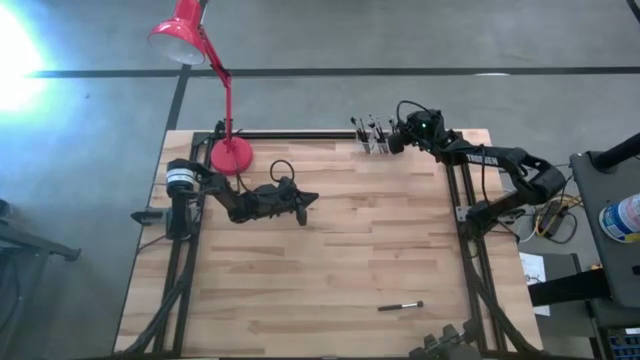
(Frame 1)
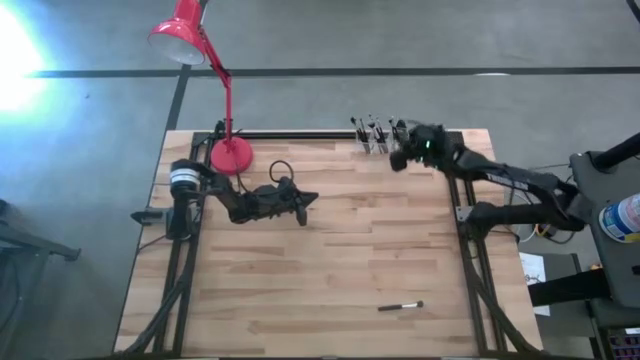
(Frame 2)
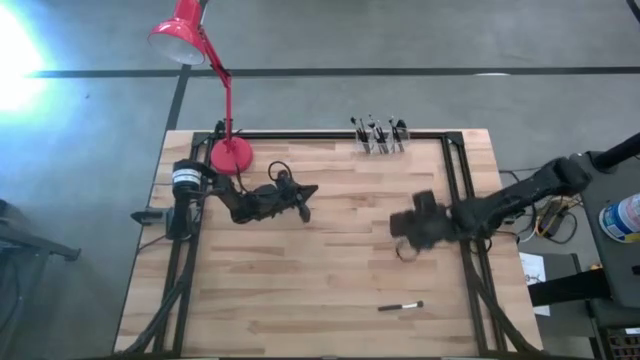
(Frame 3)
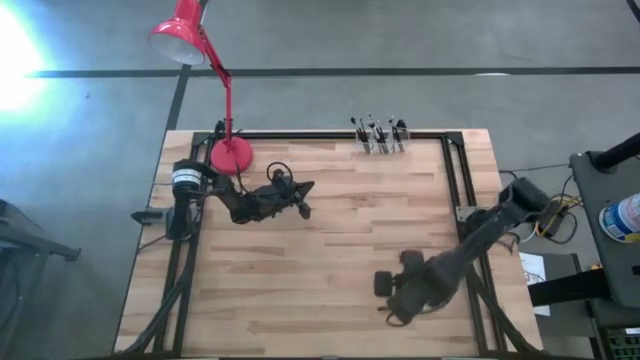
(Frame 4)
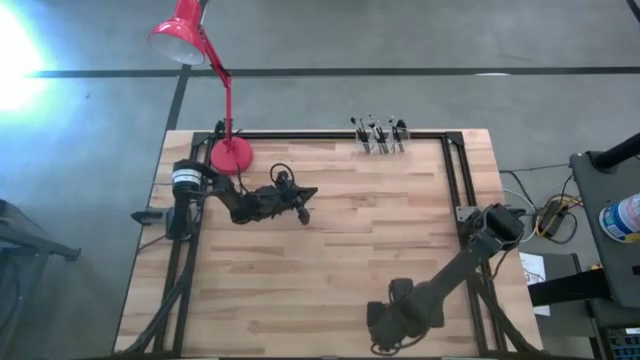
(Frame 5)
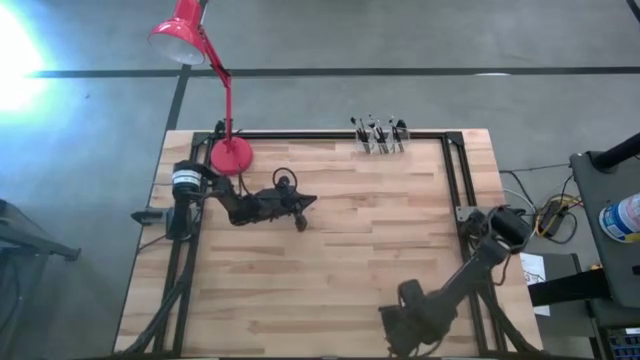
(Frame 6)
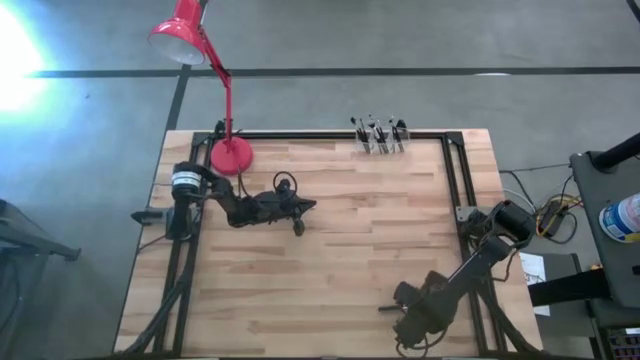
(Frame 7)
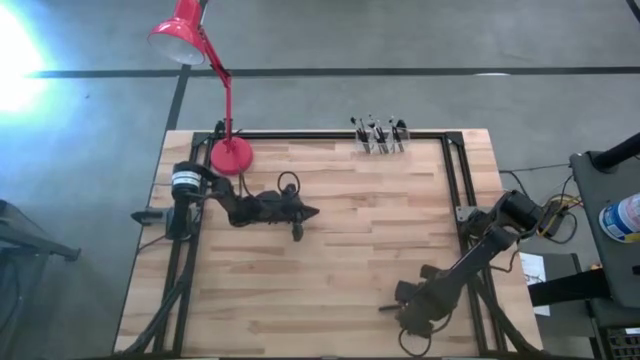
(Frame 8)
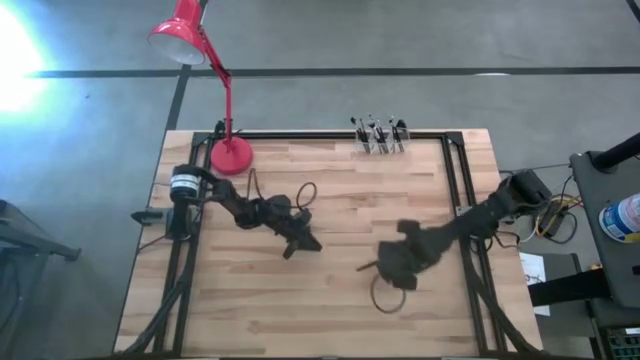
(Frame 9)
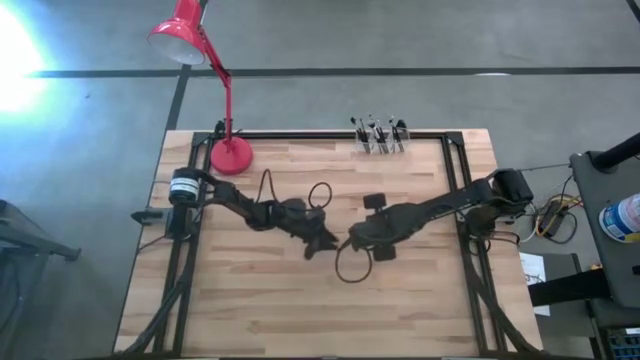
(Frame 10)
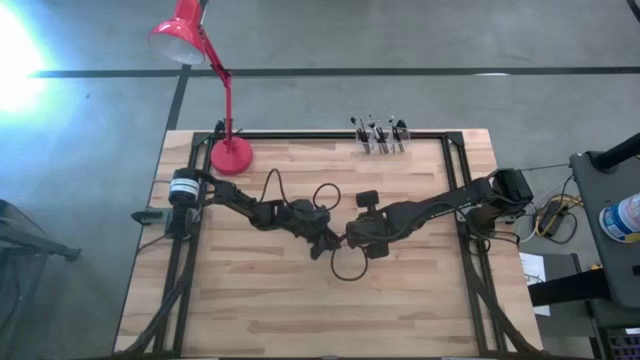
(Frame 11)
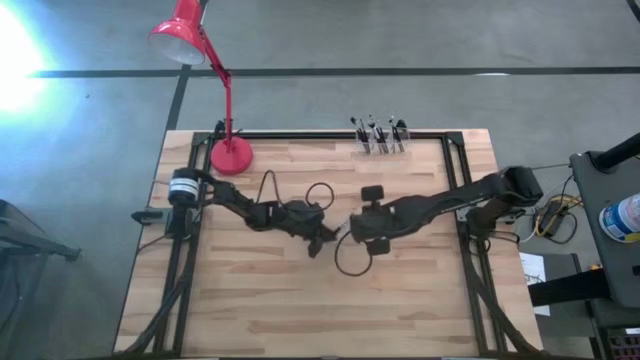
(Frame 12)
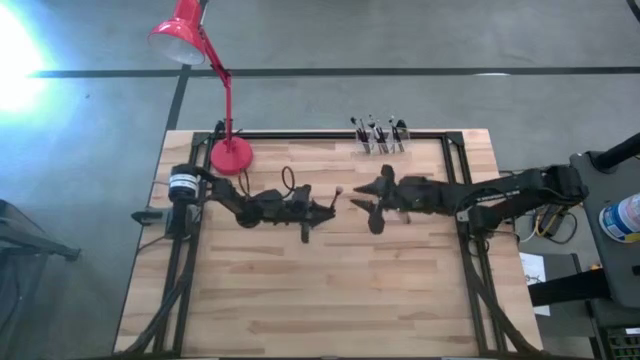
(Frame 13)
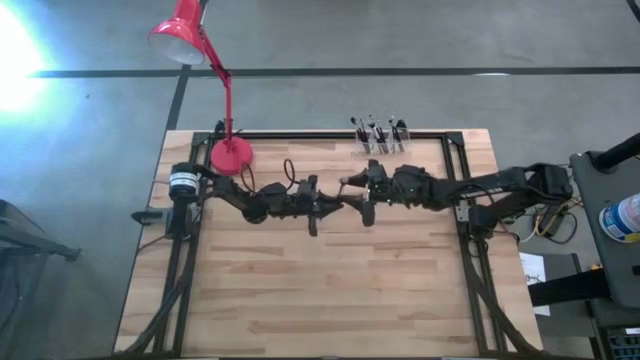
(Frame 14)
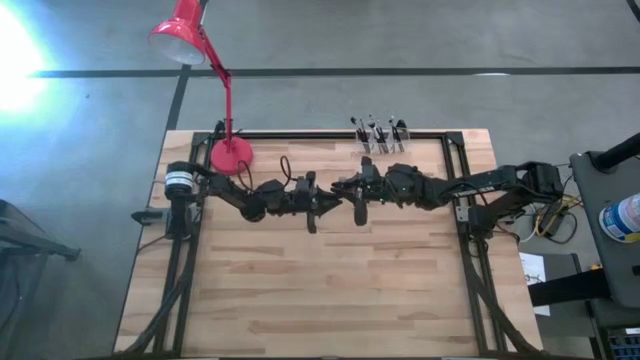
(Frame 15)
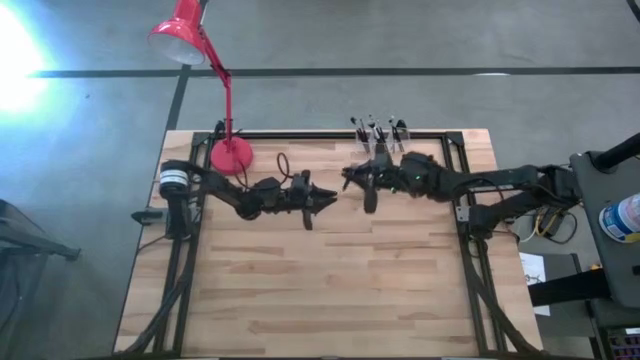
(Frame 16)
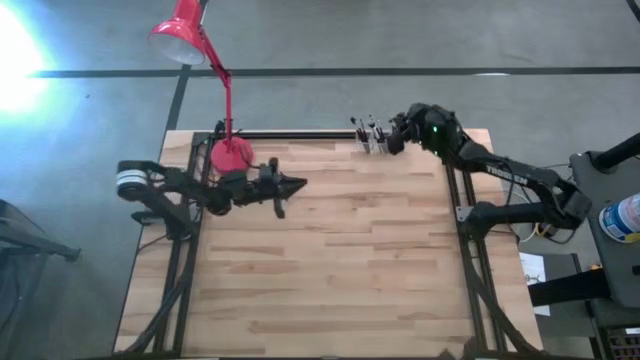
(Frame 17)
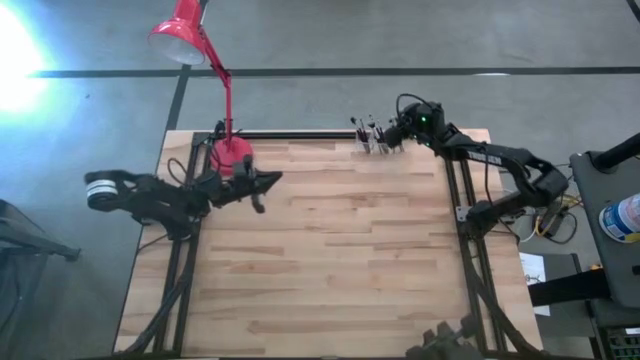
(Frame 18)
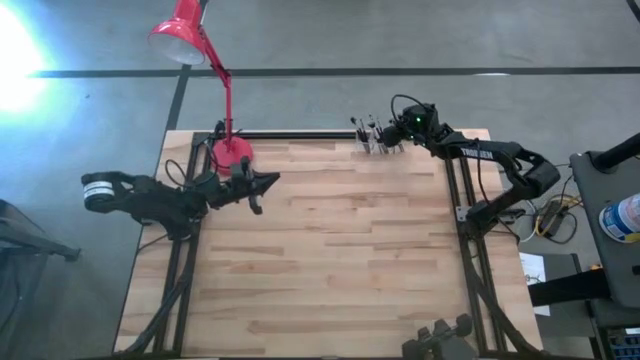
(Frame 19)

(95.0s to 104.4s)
Task: Put items in baskets/containers
Put the powder brush into the transparent organizer

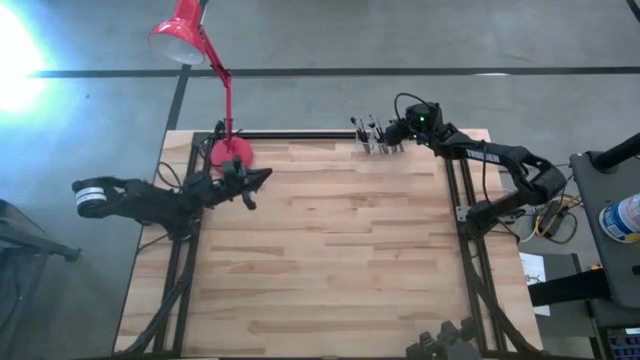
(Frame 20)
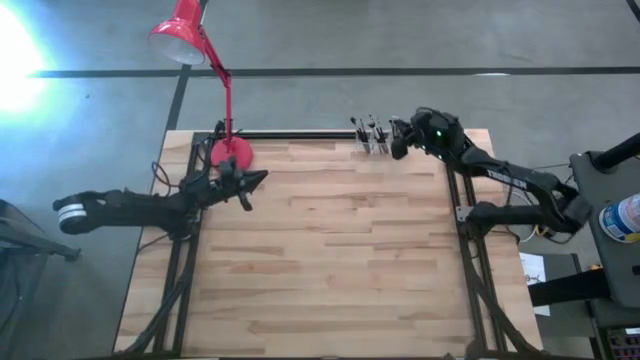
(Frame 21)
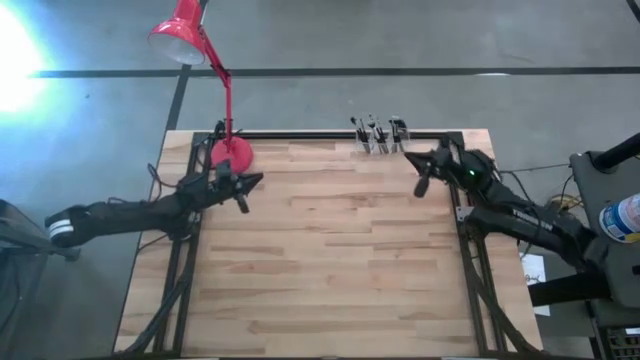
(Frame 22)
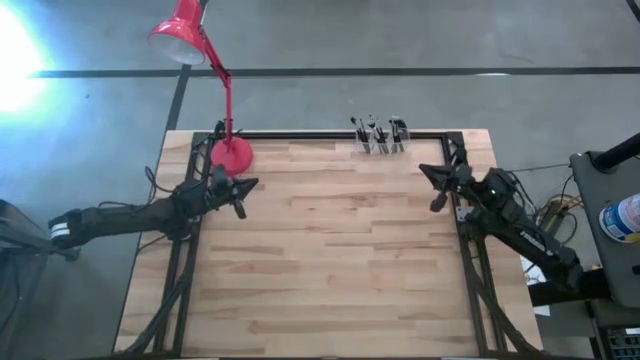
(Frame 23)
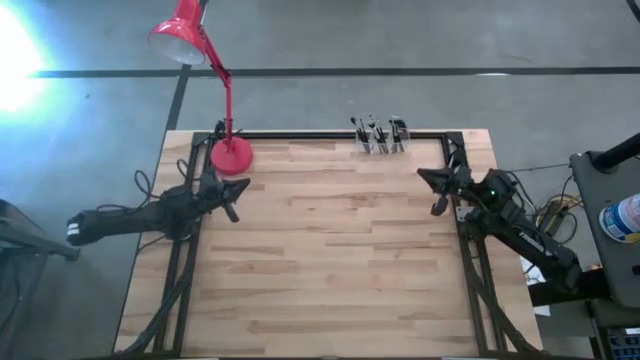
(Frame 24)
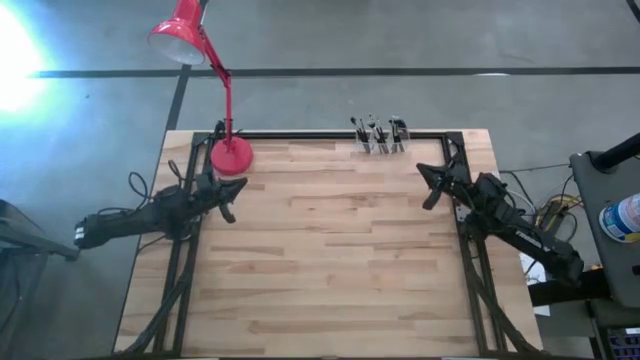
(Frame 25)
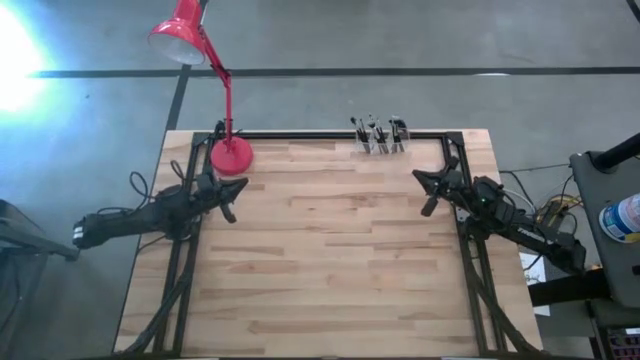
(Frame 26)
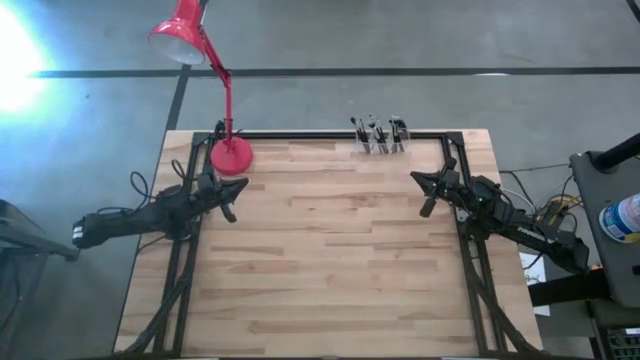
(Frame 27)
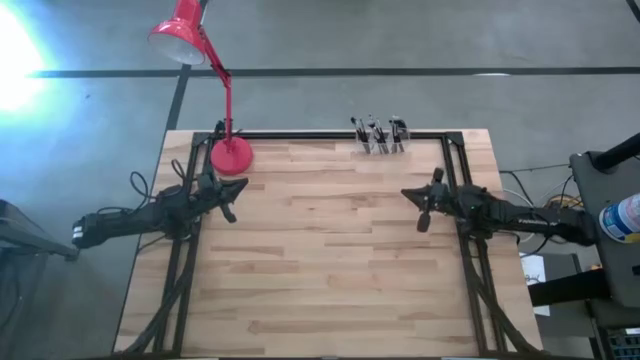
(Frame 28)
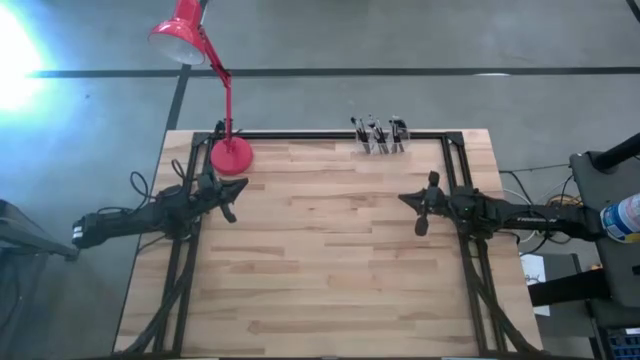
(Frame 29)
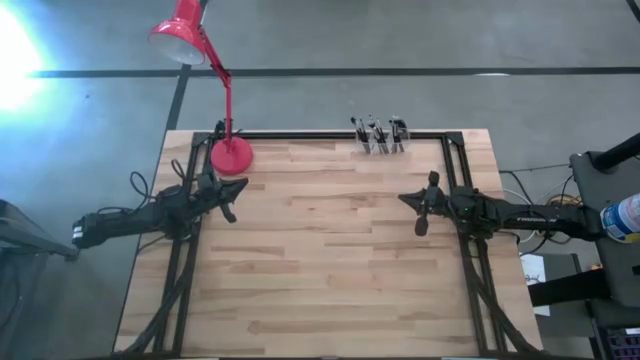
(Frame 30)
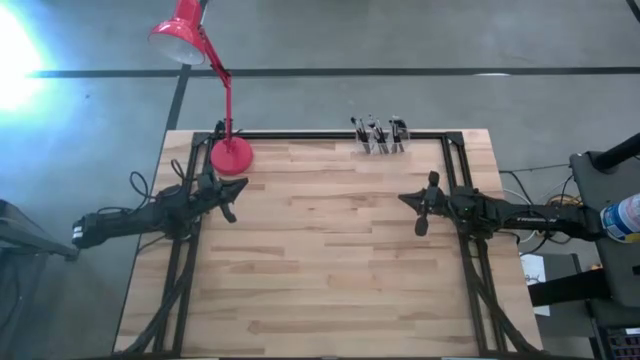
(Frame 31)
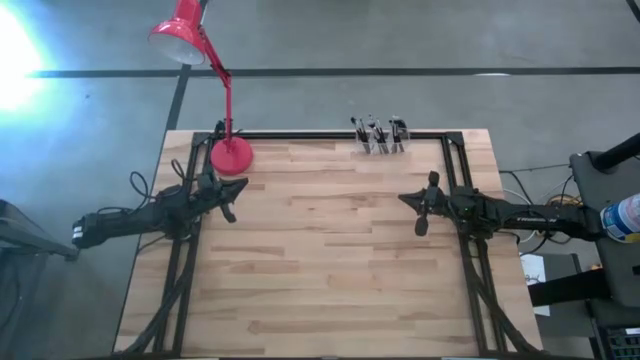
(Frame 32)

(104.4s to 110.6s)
Return to Home Position

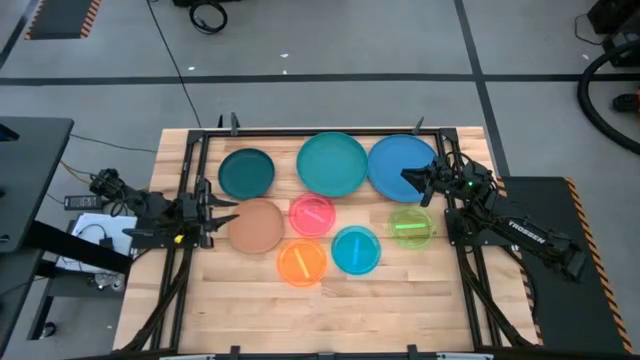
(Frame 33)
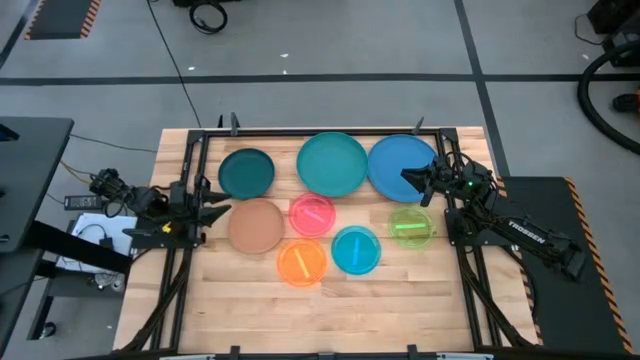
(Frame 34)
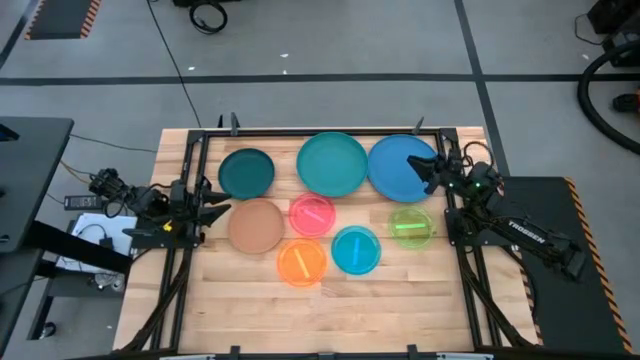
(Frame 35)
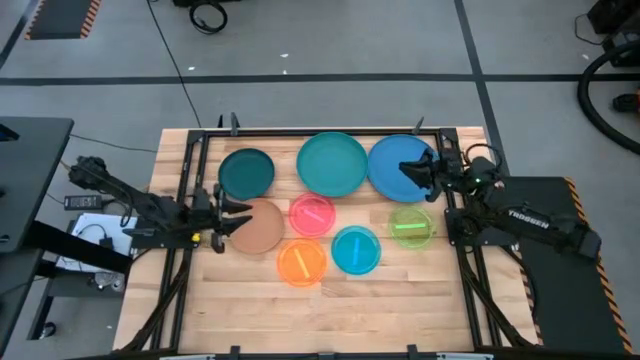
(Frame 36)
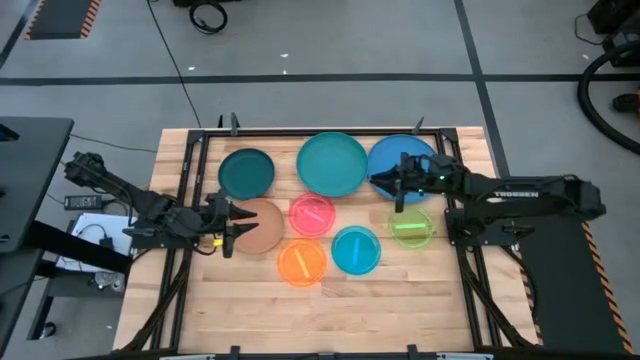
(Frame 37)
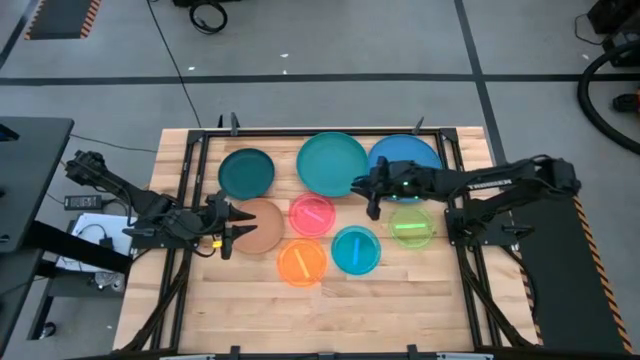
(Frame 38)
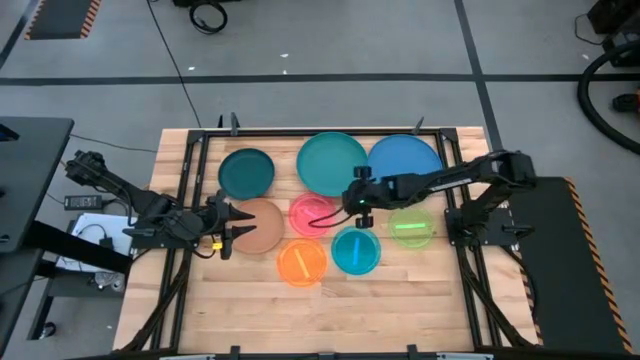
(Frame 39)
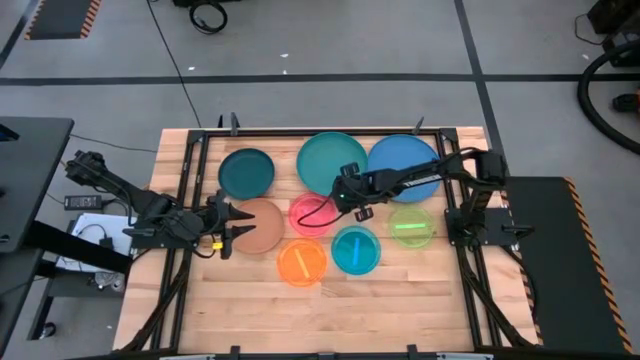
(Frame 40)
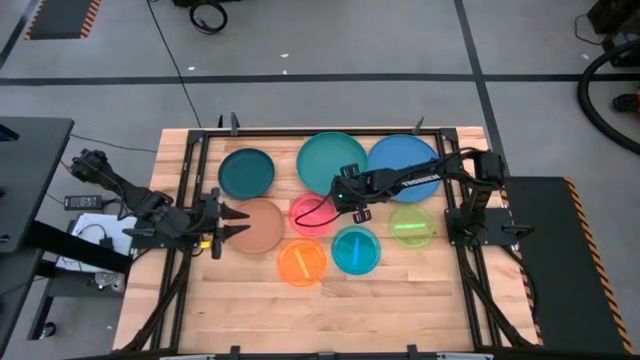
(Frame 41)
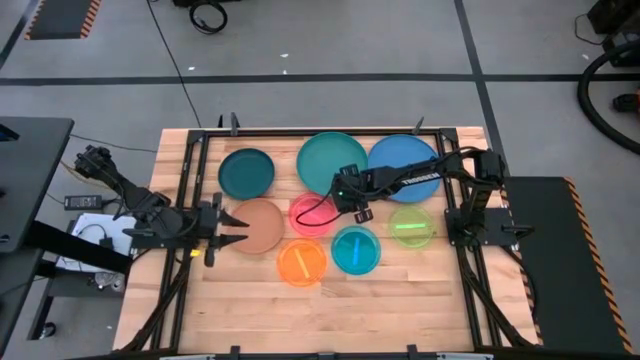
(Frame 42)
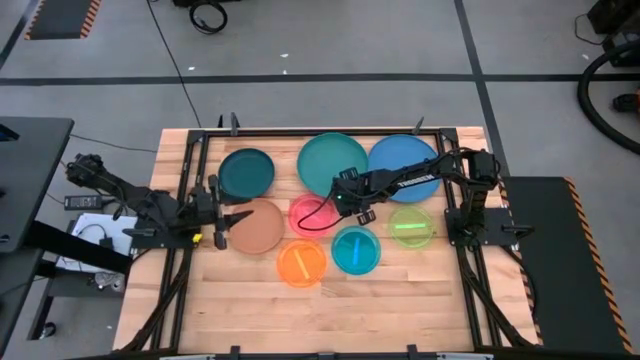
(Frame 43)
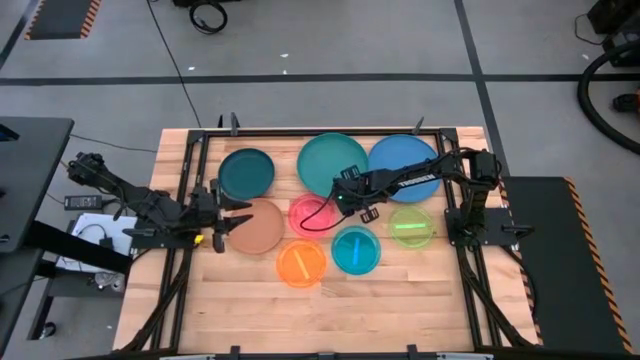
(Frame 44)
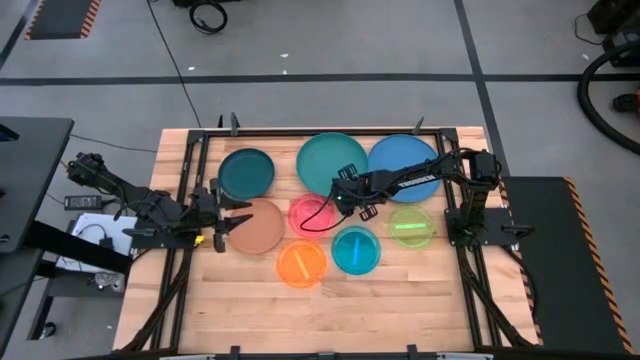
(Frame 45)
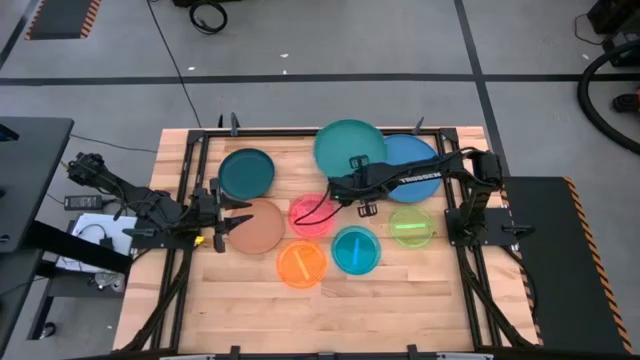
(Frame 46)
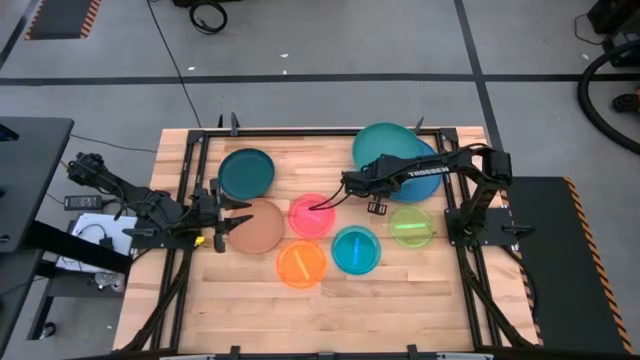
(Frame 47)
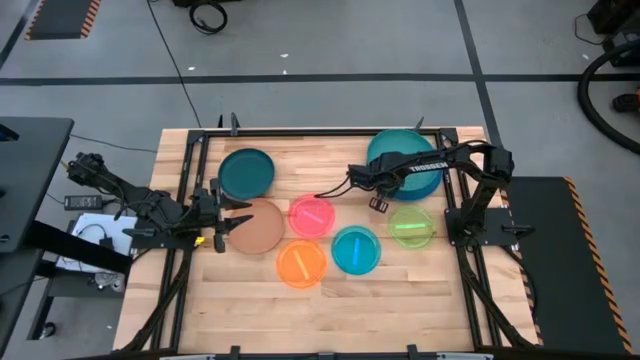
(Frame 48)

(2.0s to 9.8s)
Task: Stack plastic plates
Stack the green plate on top of the blue plate
